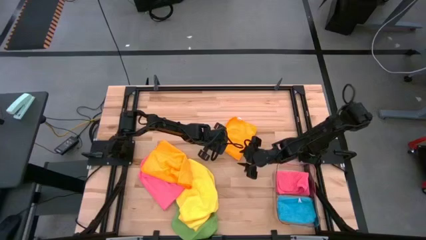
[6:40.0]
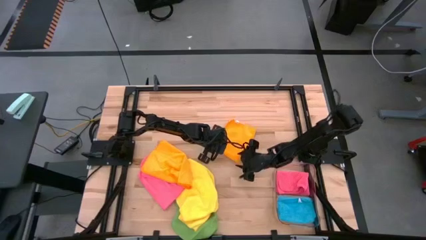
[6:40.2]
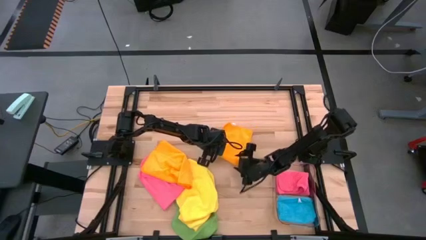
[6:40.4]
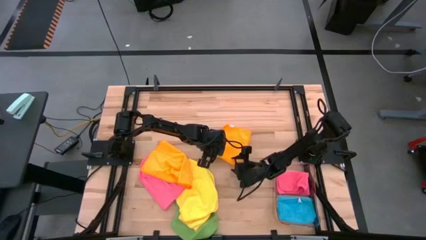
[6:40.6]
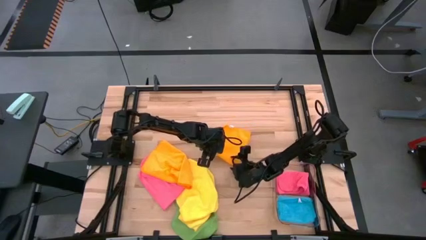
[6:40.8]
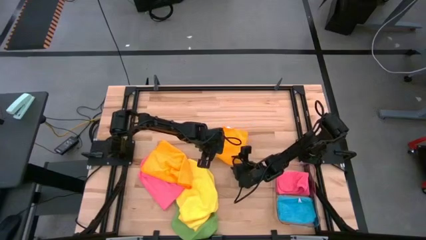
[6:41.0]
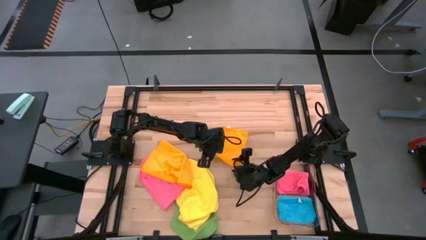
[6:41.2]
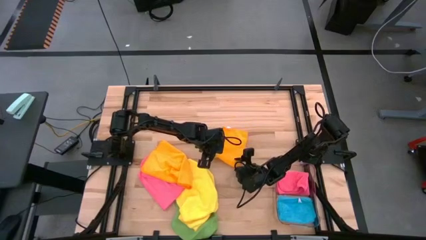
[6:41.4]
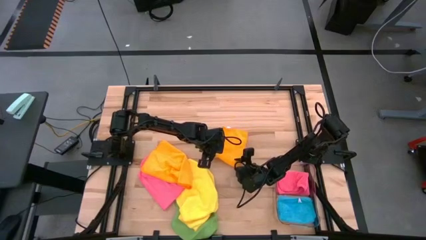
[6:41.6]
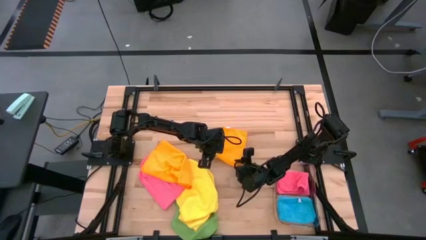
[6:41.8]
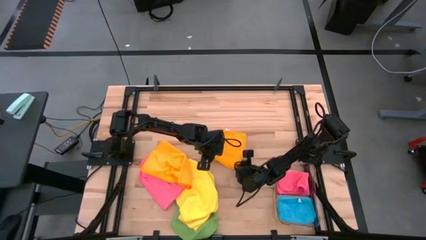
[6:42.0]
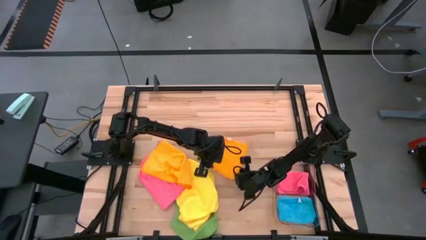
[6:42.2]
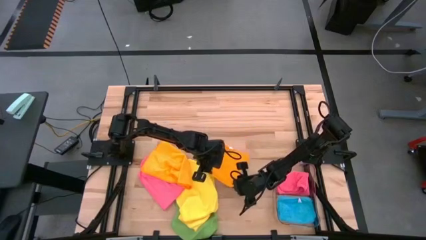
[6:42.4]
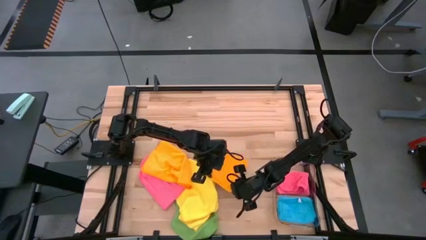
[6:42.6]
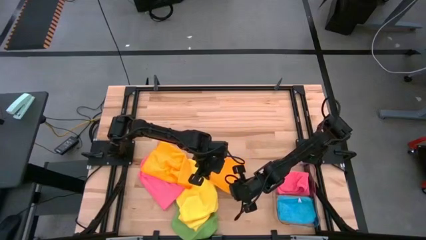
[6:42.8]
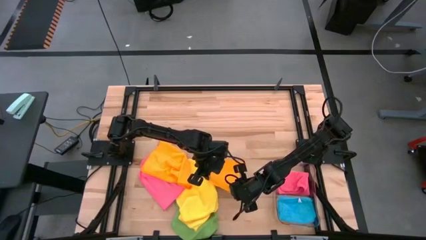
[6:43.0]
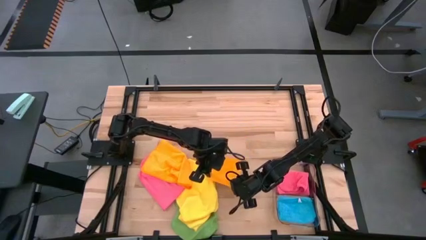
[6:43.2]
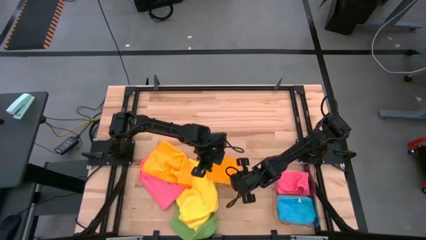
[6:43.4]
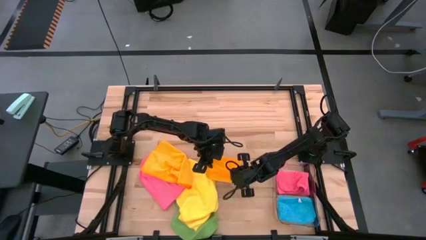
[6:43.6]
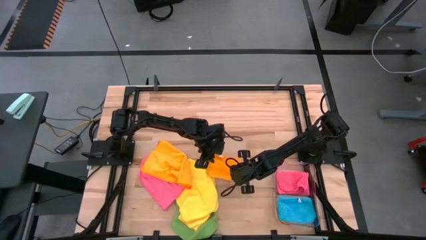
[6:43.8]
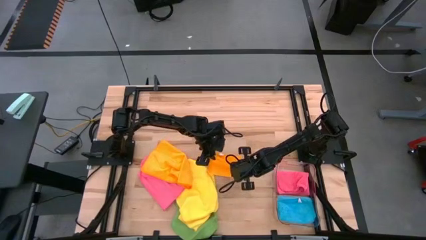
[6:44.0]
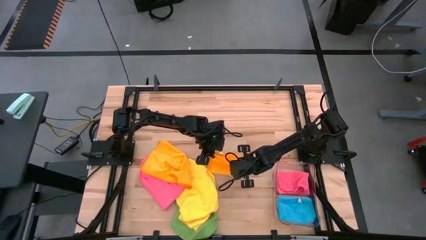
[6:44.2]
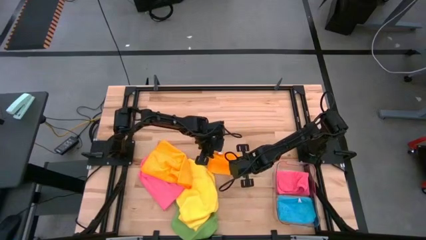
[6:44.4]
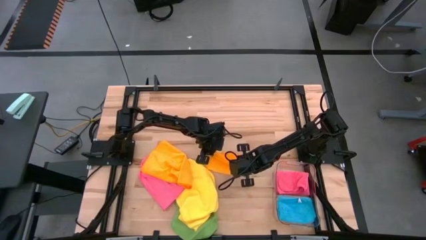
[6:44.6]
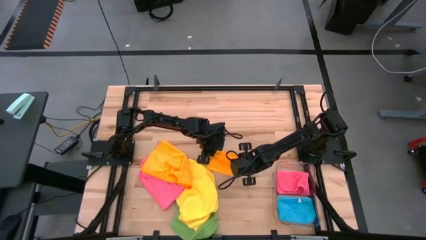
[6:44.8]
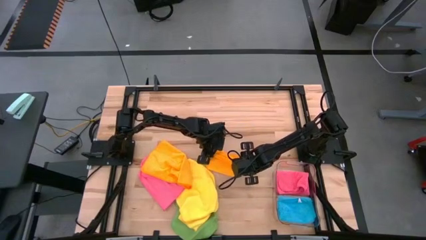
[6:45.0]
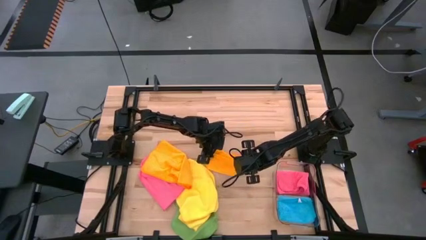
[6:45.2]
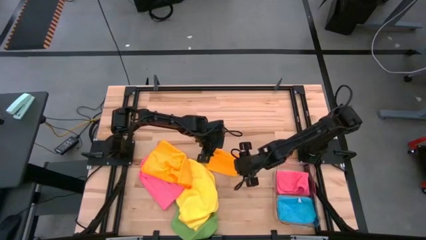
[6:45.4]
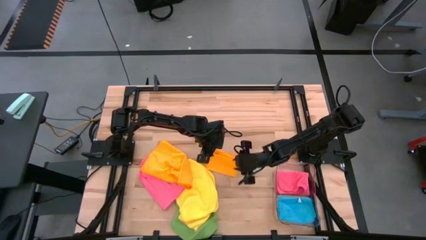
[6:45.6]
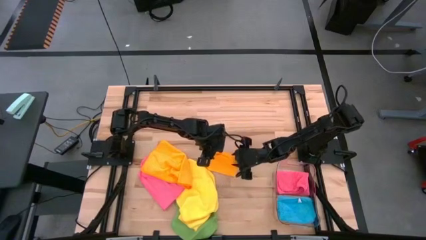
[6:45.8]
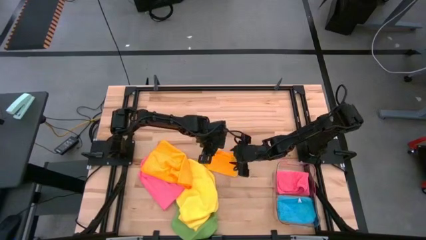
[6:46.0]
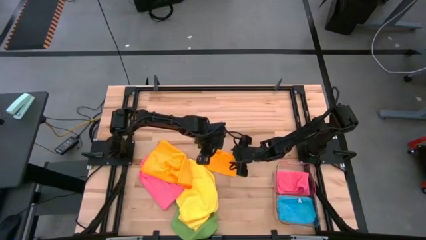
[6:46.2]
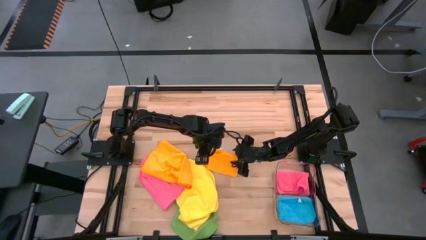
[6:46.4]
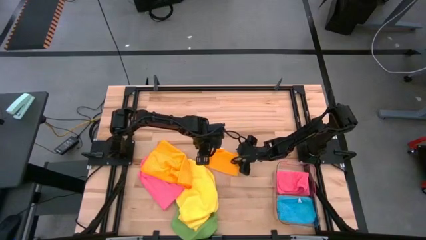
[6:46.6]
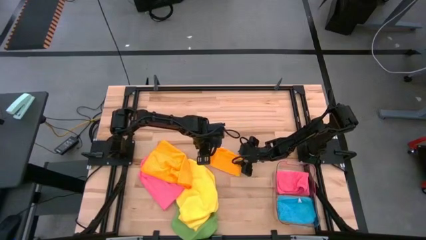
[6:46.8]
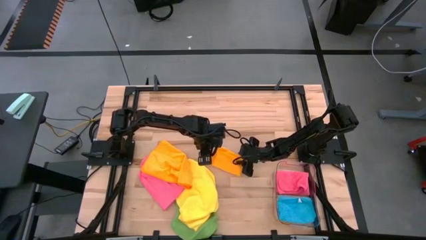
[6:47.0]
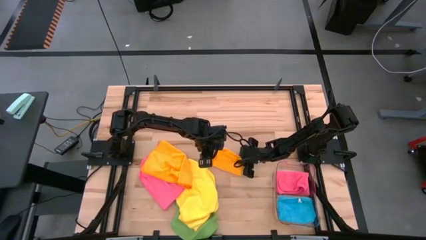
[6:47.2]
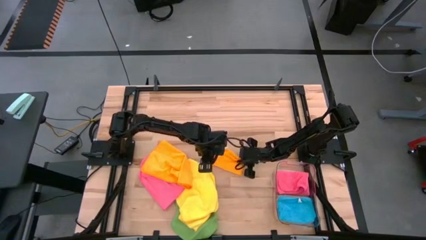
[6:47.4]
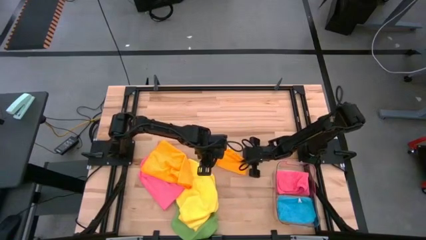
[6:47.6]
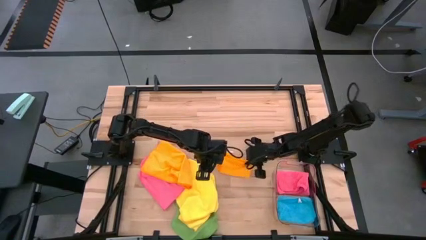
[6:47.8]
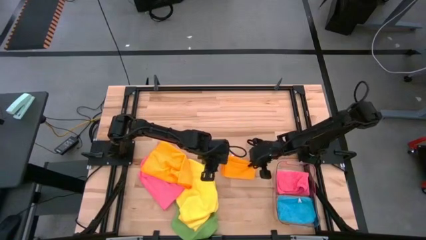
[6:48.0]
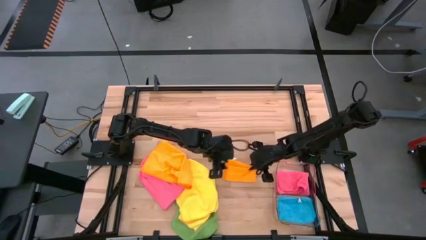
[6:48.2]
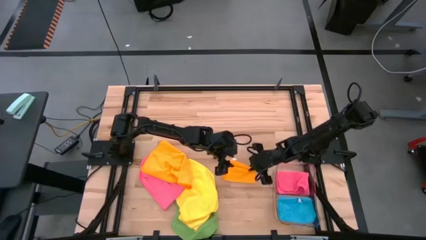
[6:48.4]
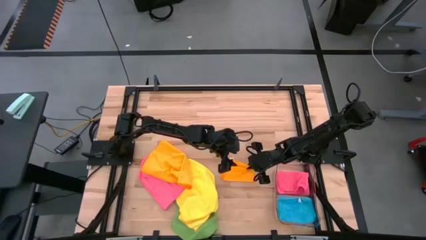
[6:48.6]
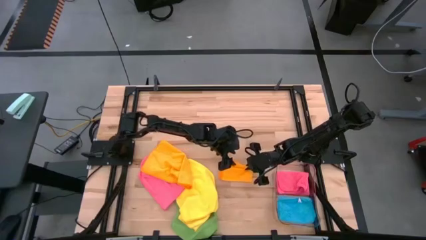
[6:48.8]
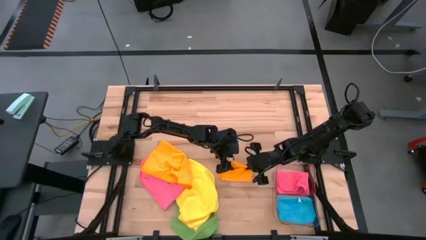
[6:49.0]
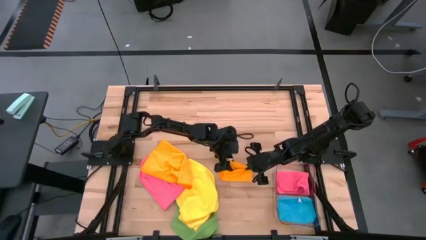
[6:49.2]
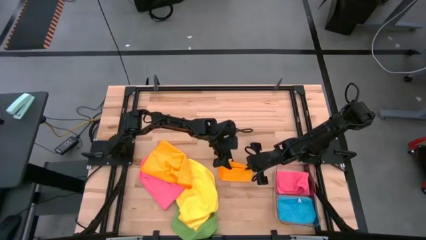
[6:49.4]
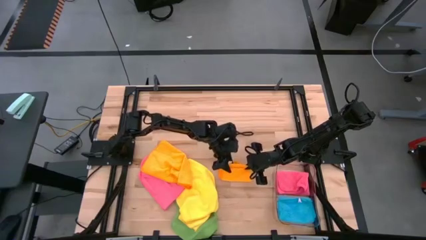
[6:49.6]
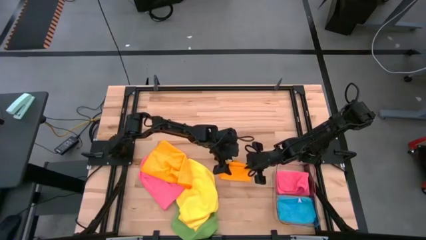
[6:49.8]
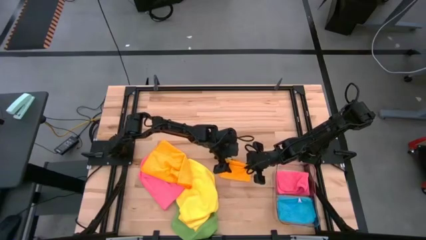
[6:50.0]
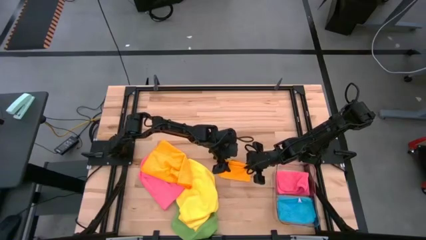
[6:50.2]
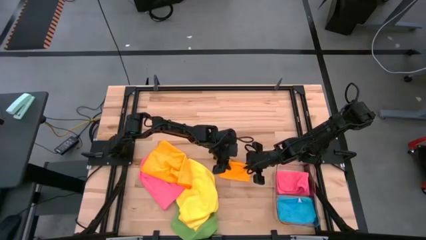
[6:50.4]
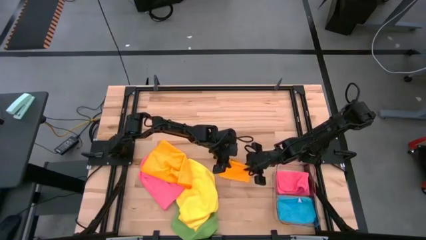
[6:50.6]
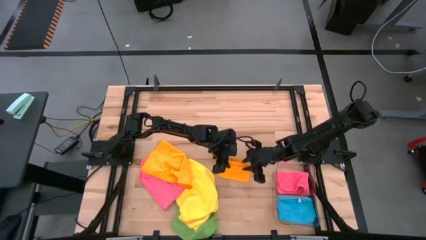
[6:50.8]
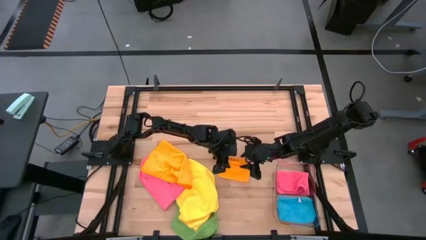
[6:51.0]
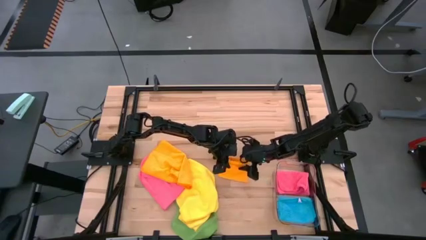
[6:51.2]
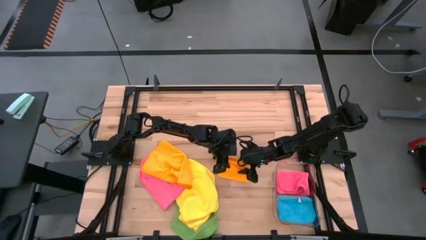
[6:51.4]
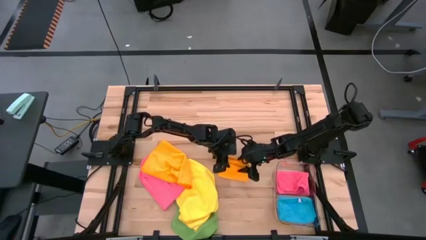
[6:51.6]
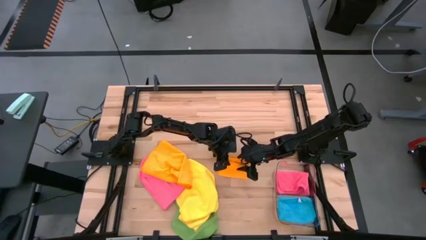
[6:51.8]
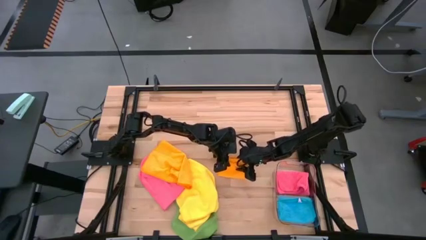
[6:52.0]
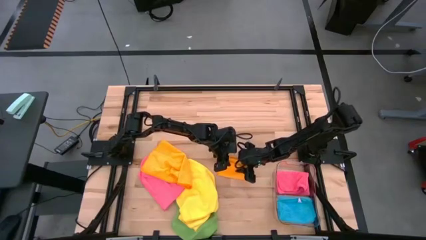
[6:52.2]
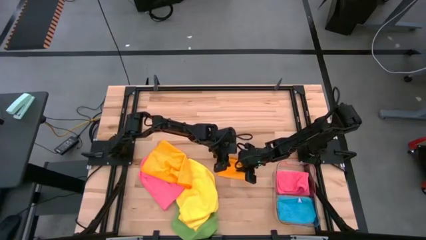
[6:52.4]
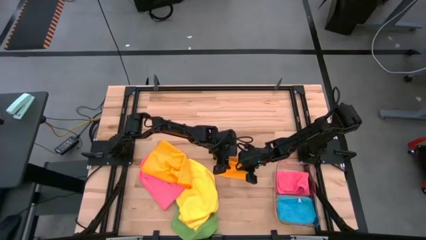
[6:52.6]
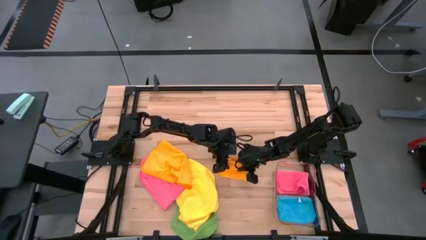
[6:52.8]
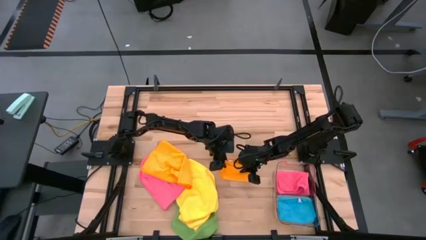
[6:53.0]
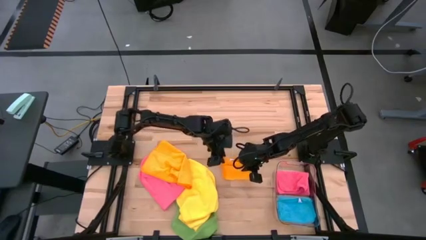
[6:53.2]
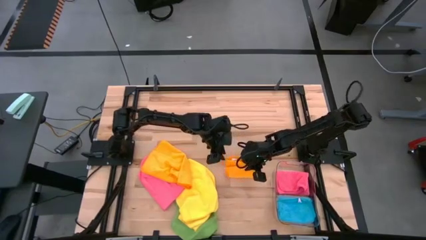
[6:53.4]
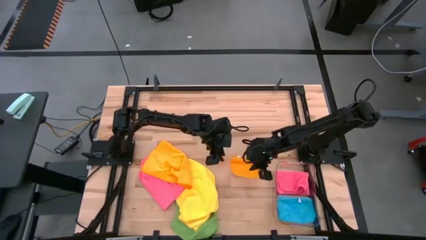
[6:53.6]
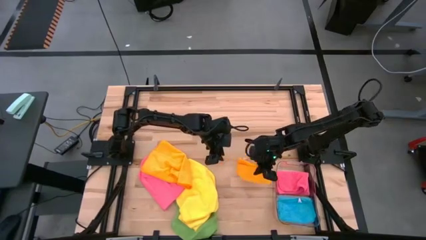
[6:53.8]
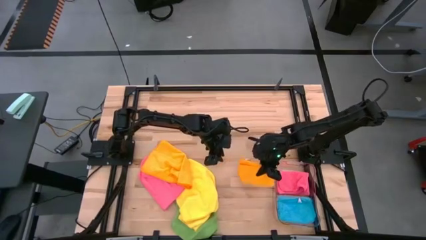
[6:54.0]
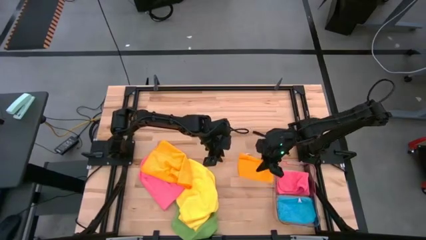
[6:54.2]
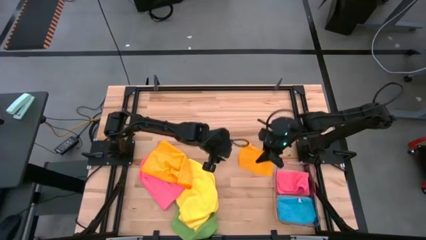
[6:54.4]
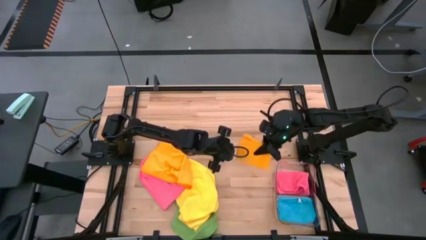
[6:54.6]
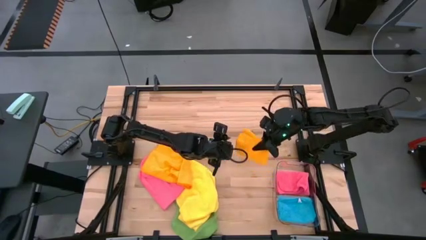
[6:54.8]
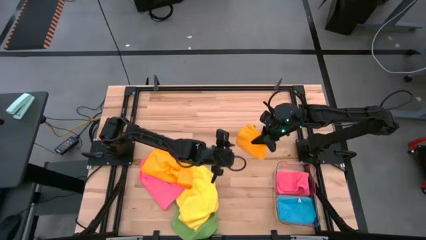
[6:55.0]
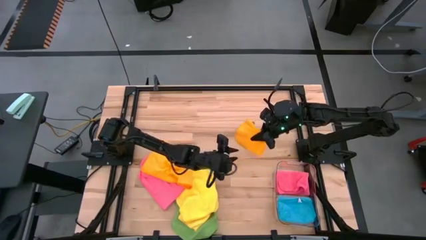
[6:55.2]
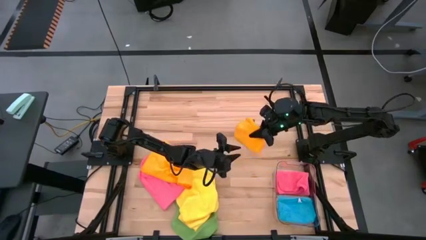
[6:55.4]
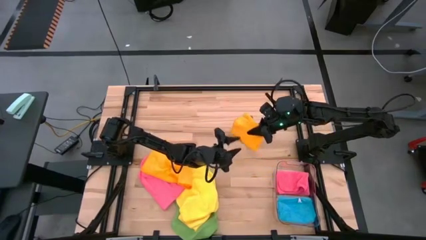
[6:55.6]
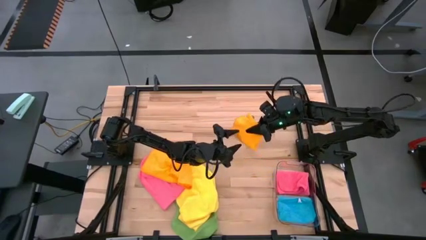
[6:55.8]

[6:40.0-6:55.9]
Task: Fold microfiber towels
Fold the orange towel
